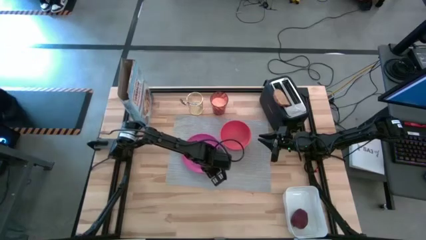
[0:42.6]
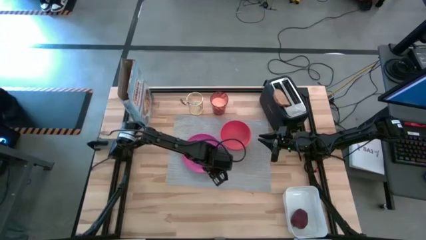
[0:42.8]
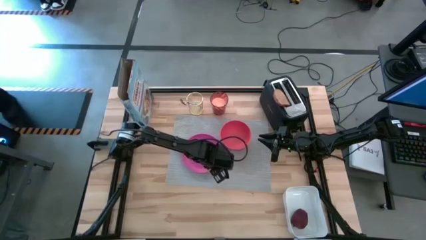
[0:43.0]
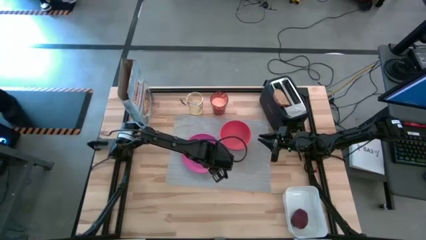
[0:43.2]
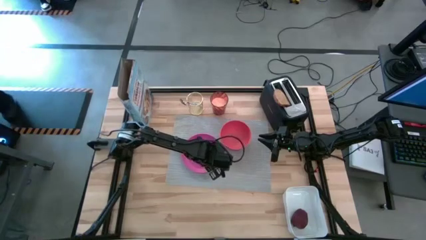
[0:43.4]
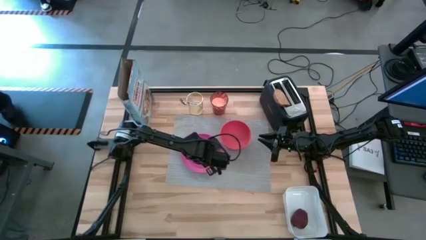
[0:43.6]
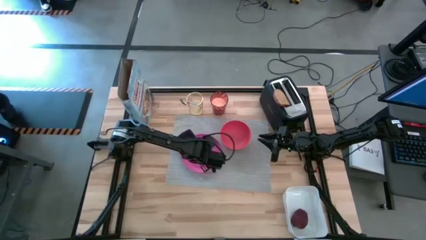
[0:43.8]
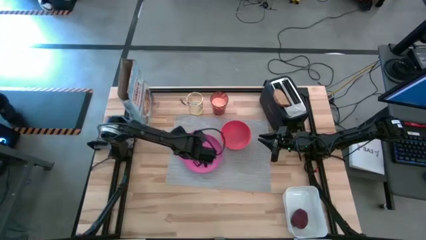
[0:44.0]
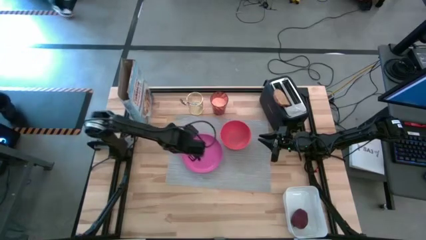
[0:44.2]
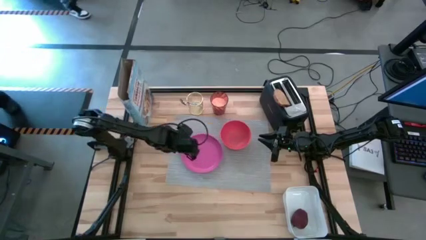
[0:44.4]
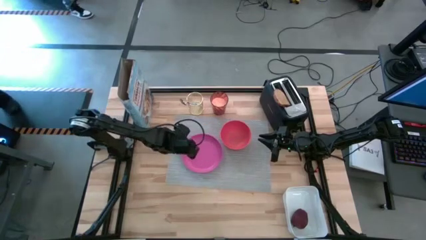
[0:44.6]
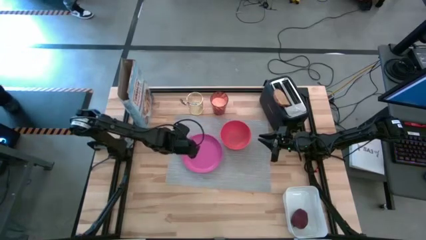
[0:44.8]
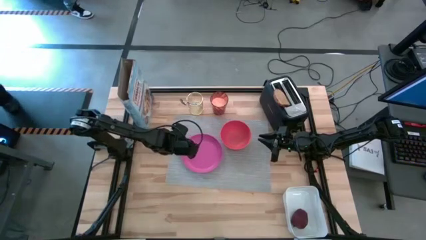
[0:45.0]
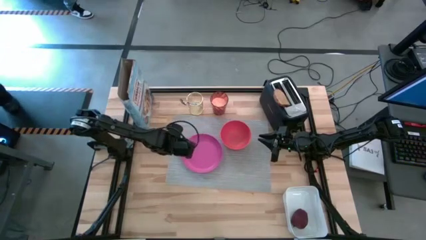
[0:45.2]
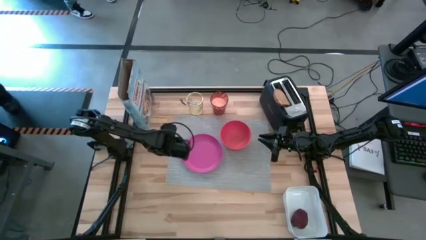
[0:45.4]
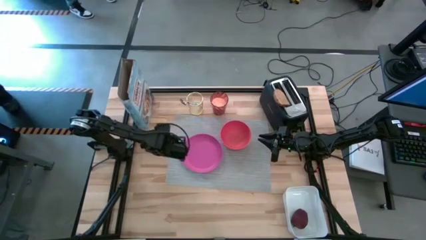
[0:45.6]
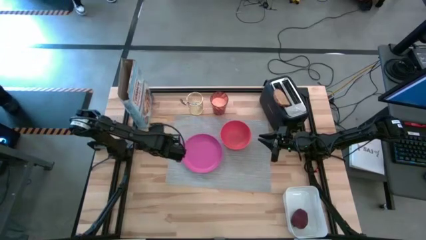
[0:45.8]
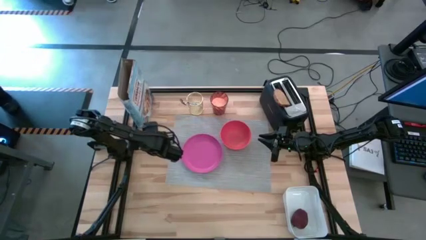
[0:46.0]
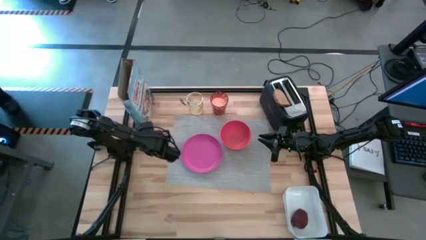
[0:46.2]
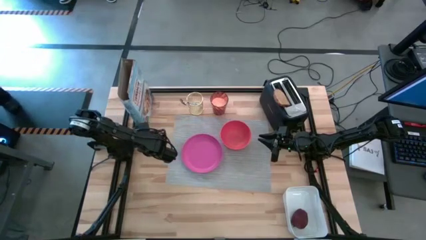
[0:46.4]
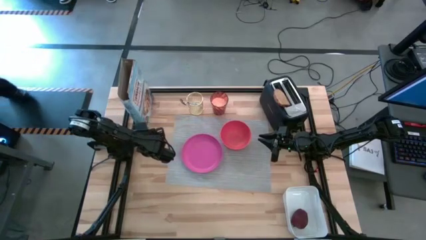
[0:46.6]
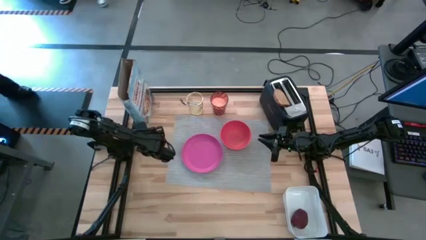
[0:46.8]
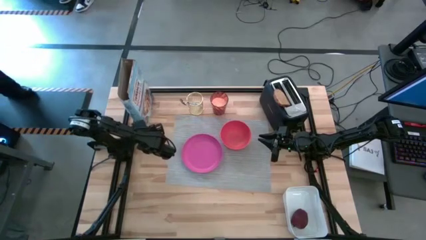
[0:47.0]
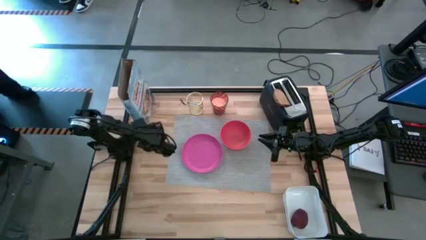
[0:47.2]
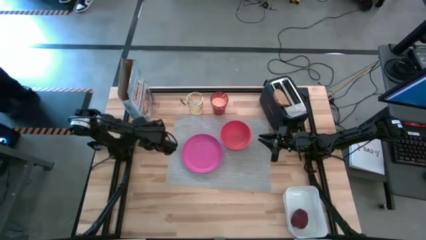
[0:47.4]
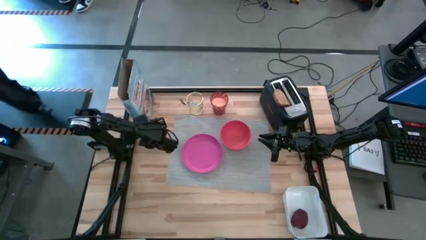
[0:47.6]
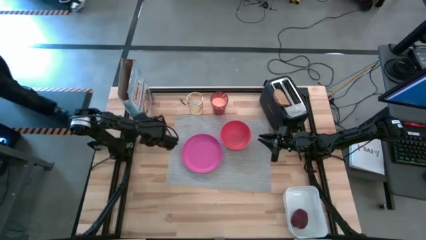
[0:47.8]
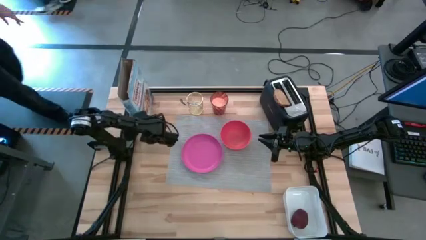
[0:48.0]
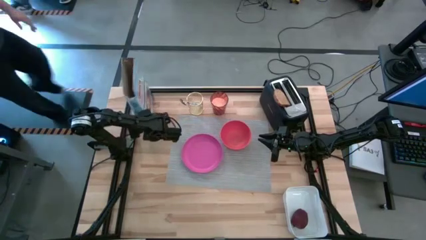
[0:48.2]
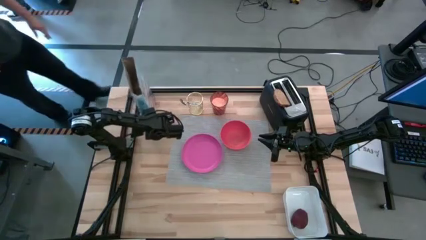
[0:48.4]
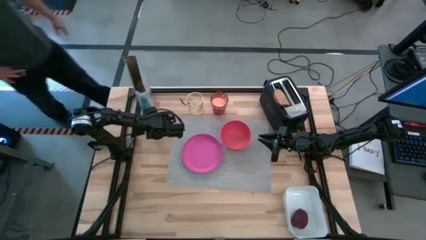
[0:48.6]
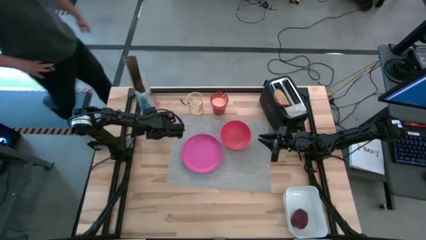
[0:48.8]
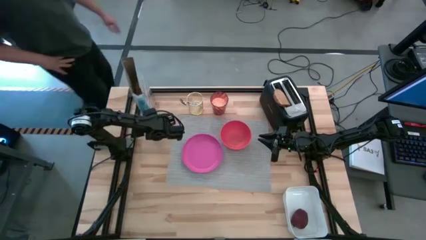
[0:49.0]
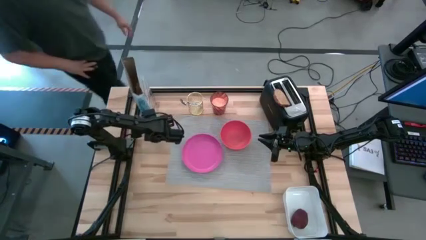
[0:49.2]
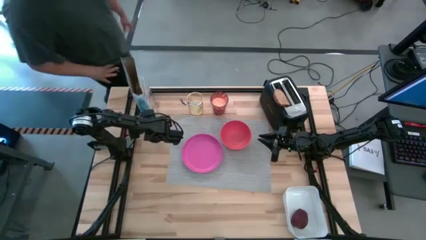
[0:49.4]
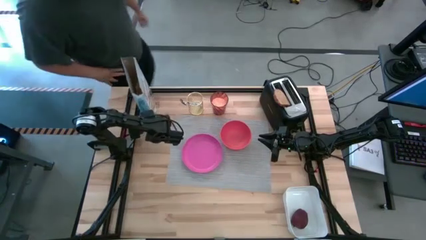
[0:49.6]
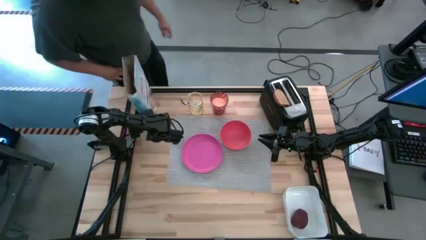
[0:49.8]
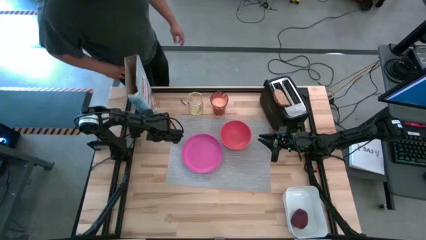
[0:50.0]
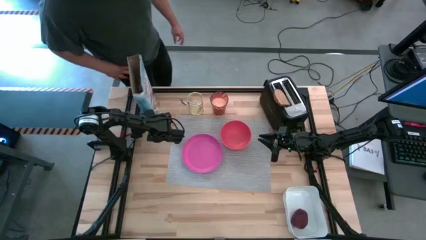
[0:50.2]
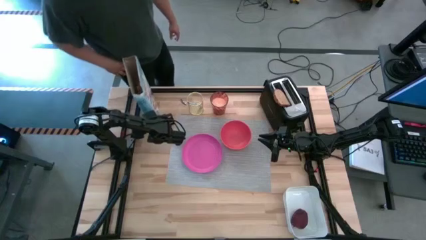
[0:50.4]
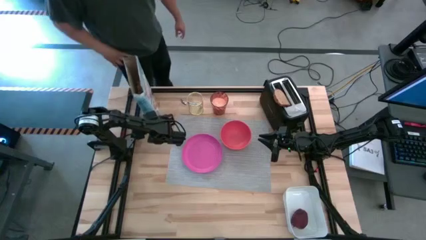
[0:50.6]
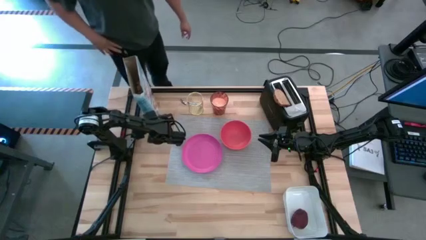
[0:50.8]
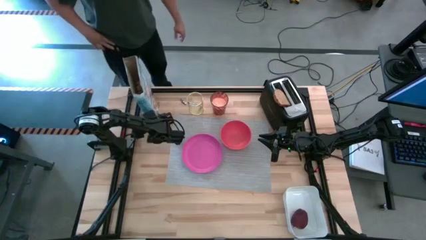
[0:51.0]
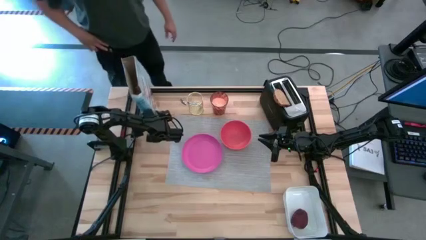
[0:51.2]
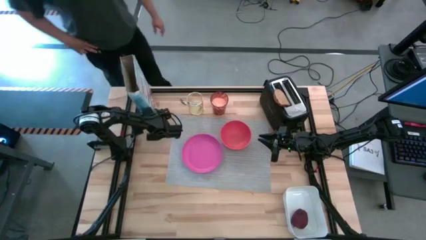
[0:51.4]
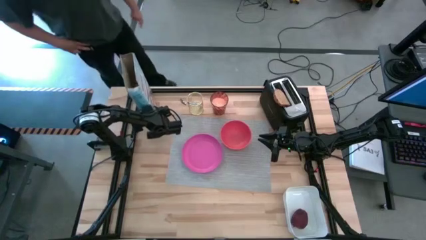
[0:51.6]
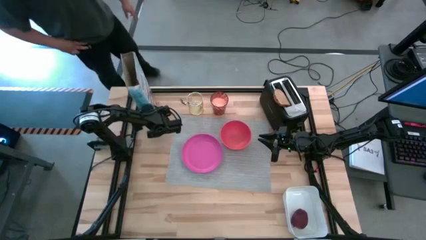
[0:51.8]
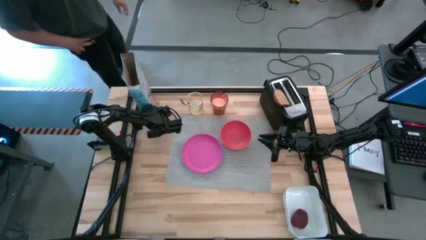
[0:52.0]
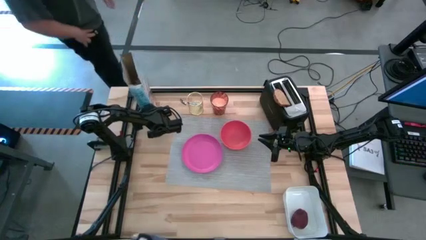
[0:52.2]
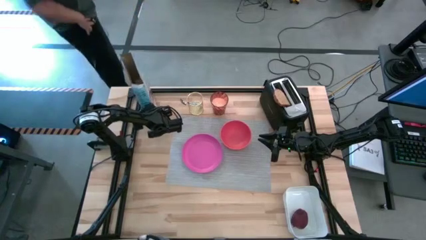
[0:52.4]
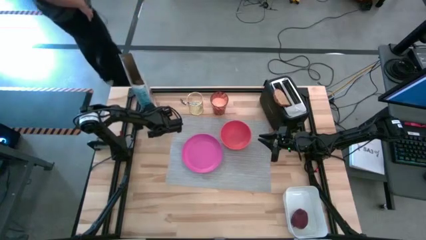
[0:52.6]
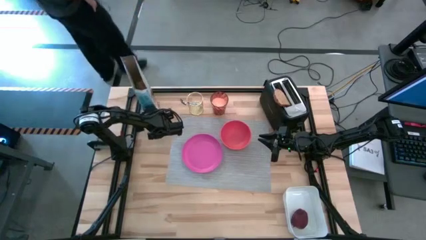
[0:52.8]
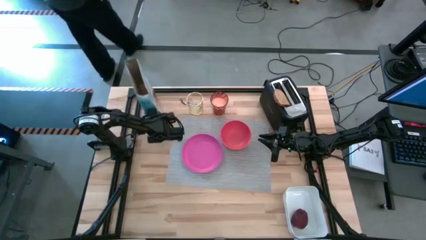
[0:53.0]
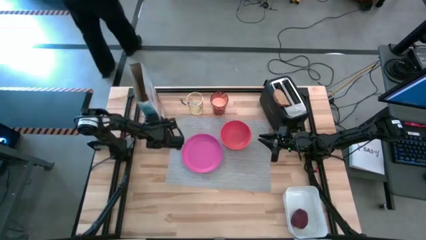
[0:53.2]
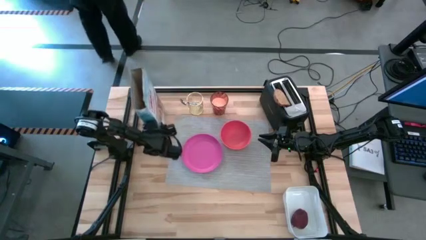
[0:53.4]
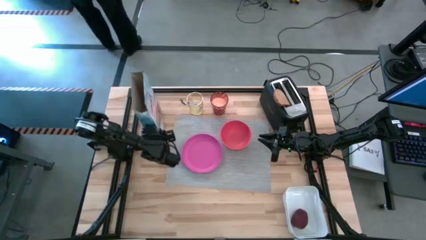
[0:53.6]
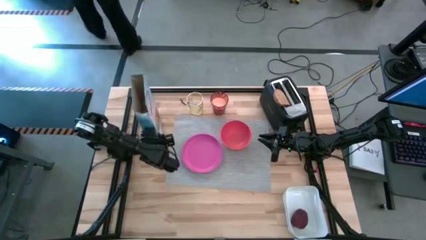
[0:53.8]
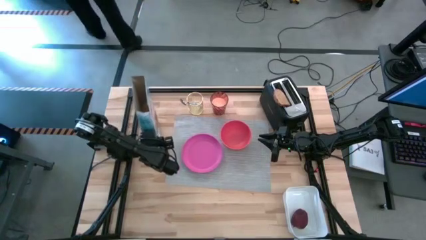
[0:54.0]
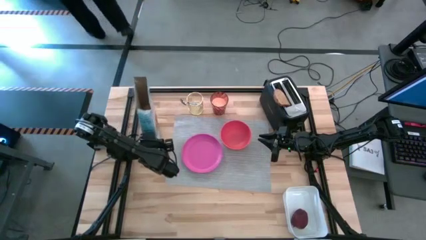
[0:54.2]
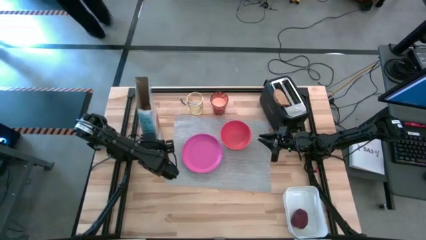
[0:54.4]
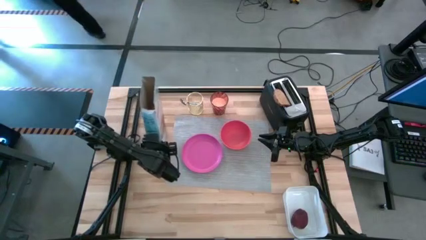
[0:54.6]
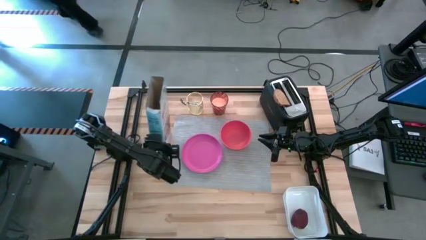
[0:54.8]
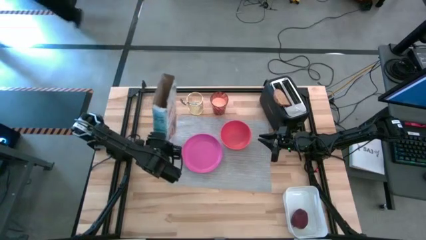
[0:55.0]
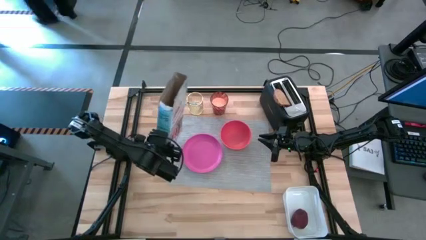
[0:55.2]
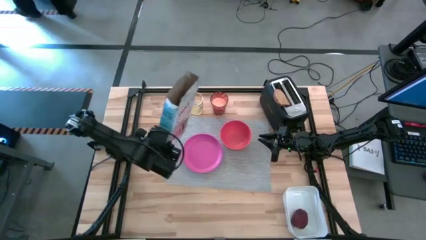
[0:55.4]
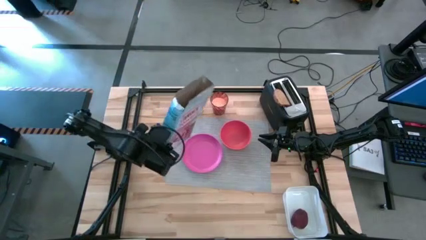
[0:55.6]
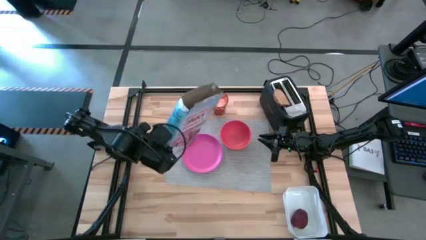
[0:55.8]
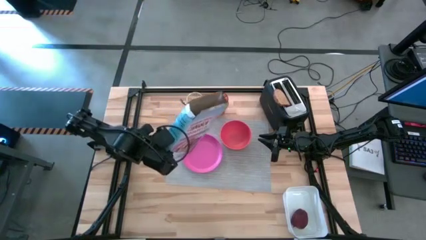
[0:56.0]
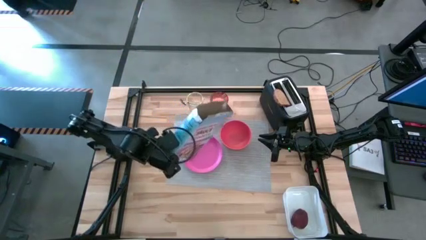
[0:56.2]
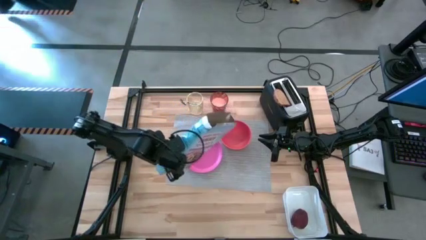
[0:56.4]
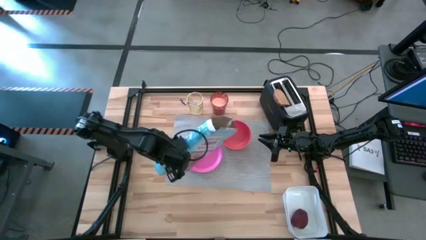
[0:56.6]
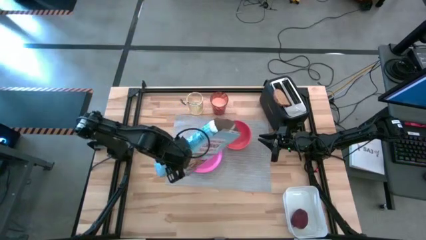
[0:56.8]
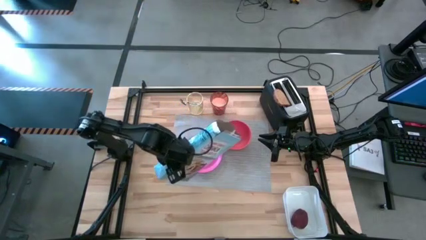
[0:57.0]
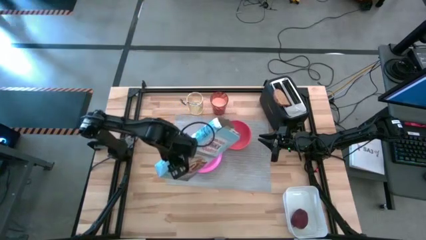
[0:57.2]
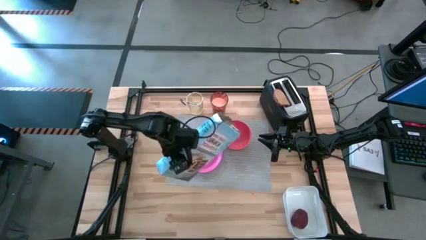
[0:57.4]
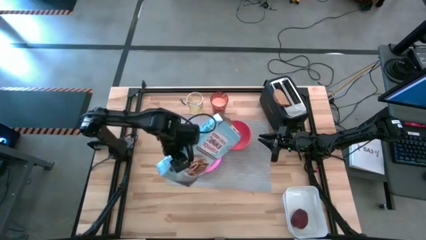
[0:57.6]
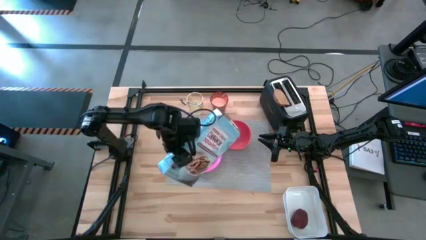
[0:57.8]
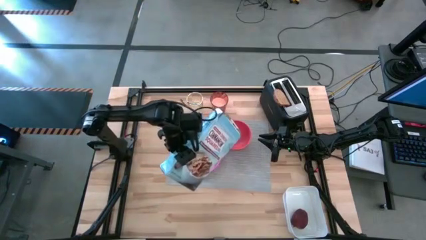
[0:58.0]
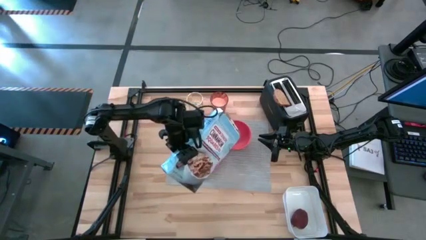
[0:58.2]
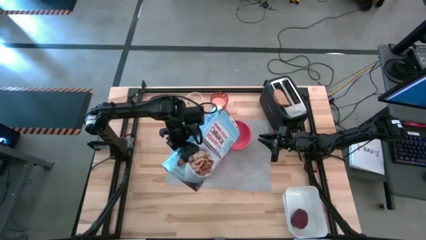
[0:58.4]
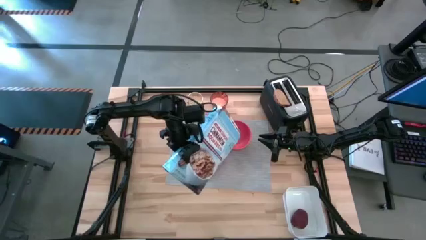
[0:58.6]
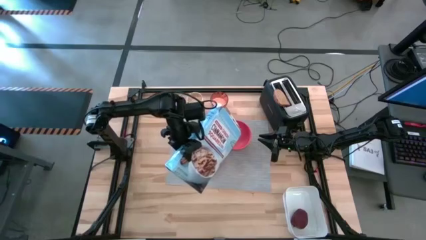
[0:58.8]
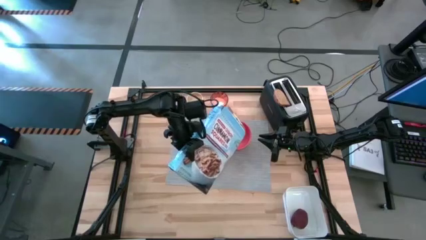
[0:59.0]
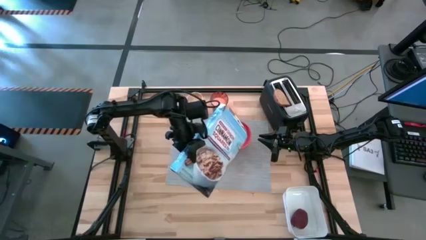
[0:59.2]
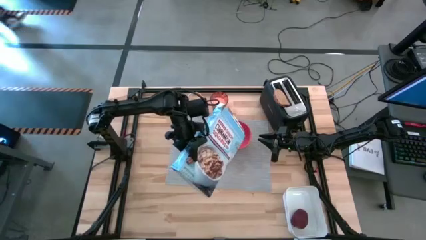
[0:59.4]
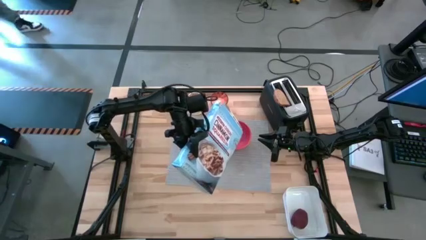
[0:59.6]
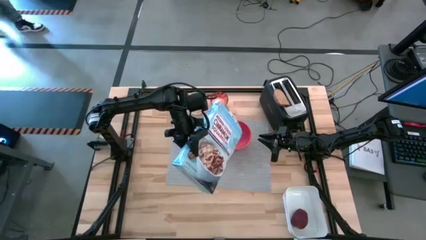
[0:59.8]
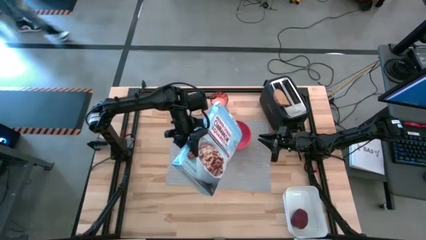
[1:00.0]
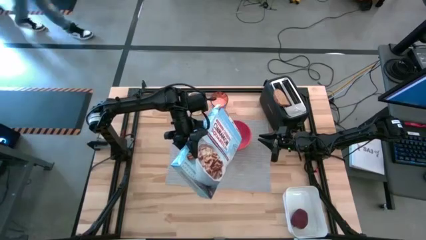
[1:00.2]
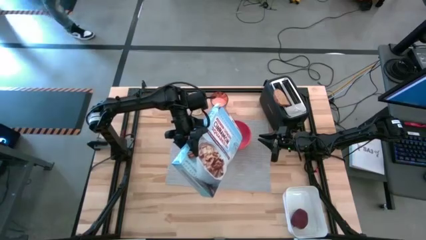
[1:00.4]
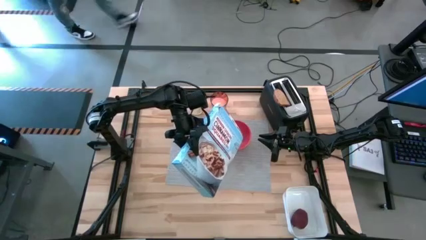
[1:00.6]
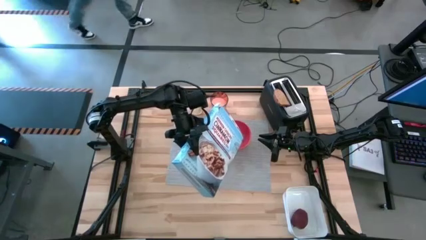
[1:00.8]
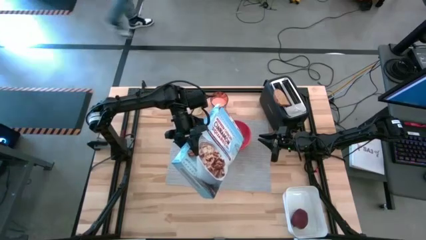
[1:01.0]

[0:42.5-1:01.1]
Task: Arrange a breakfast setting
Pour the cereal from the cereal box into the red bowl
